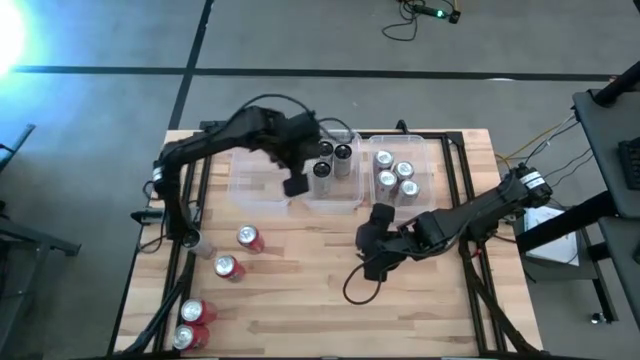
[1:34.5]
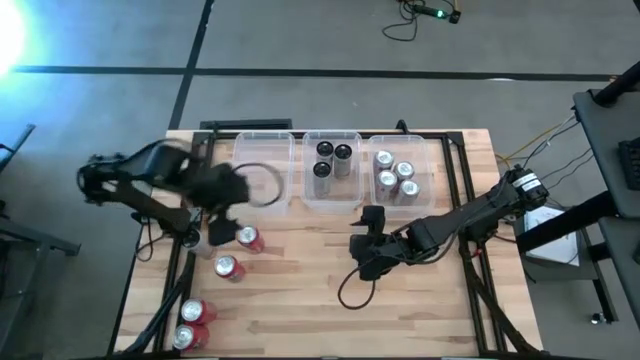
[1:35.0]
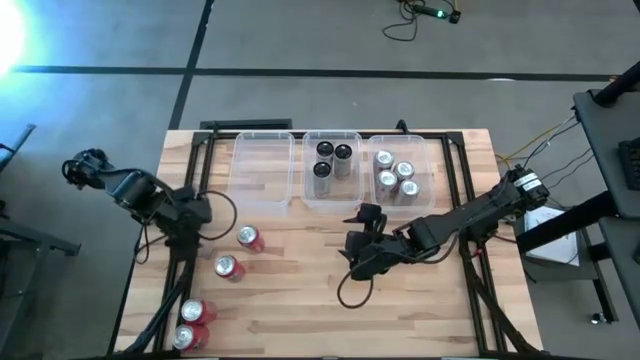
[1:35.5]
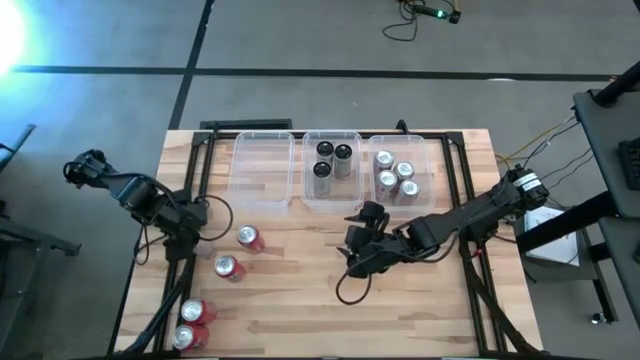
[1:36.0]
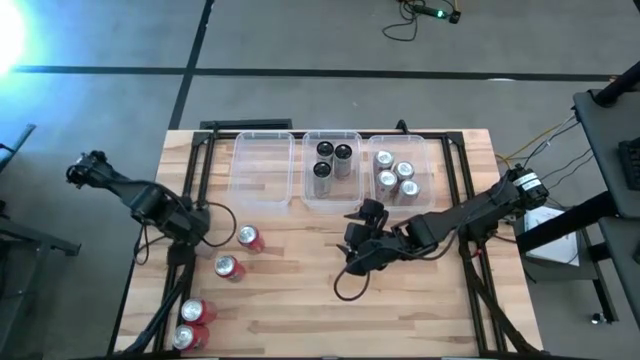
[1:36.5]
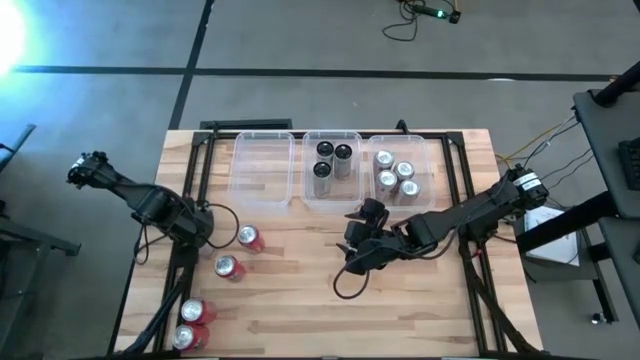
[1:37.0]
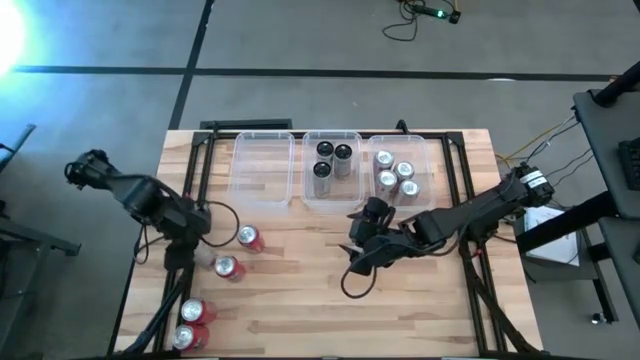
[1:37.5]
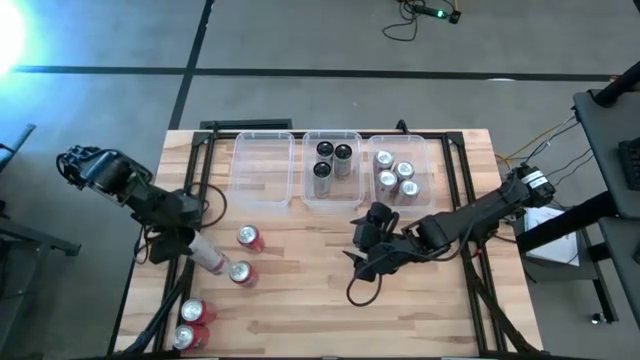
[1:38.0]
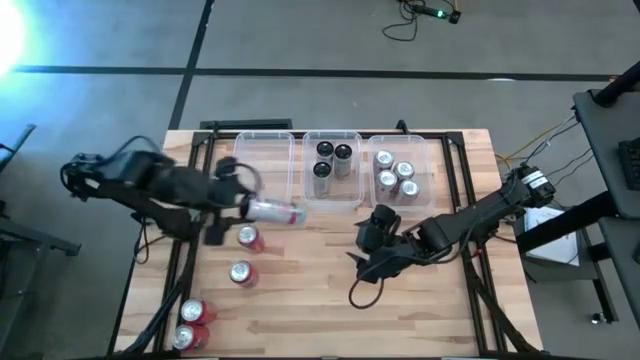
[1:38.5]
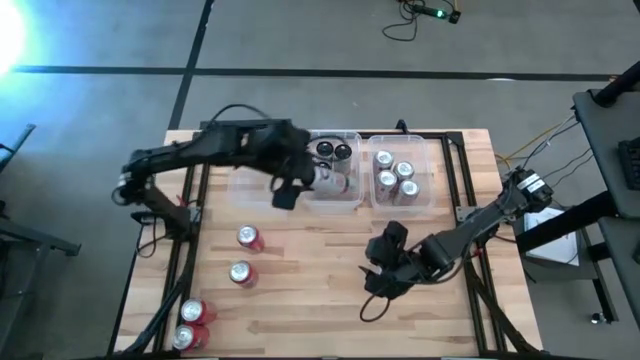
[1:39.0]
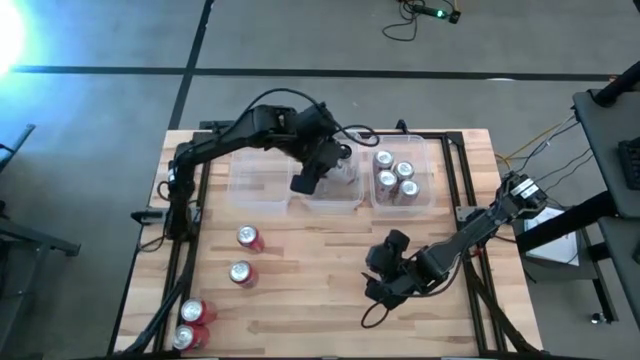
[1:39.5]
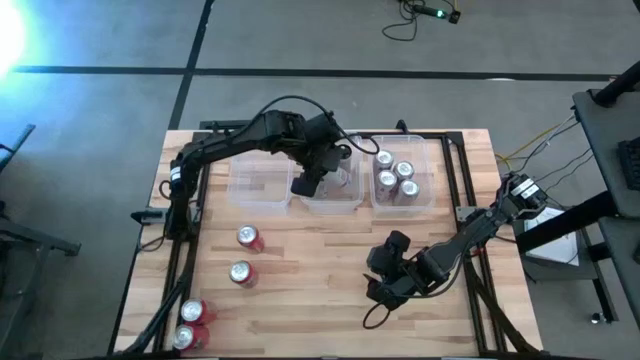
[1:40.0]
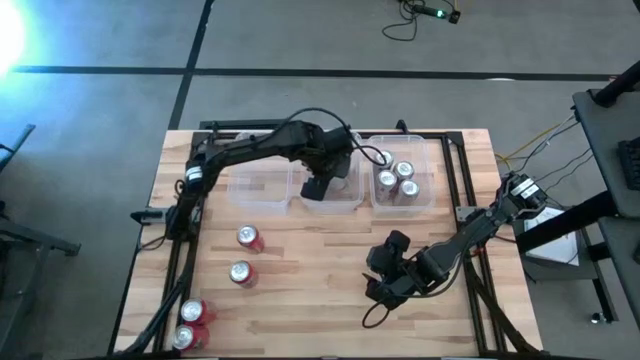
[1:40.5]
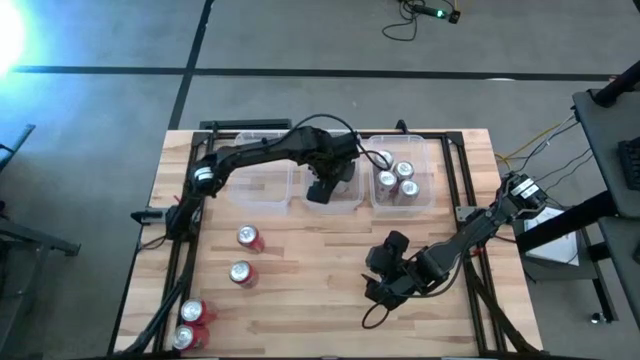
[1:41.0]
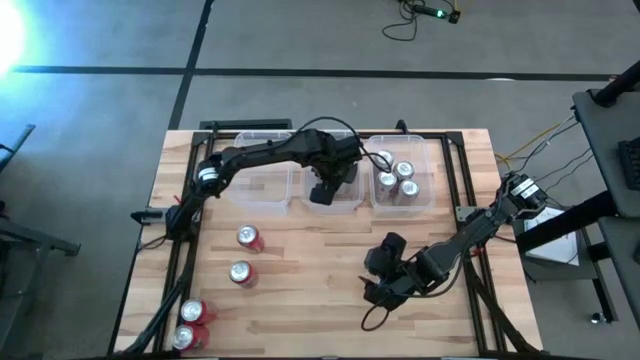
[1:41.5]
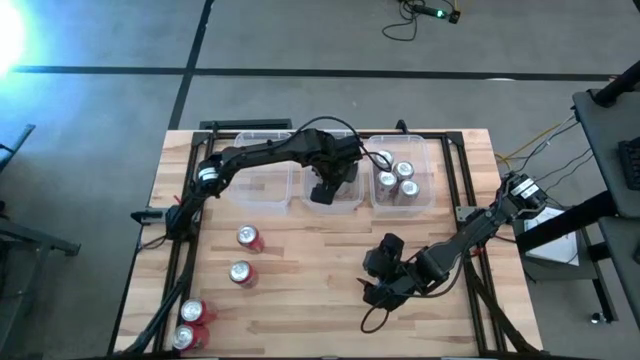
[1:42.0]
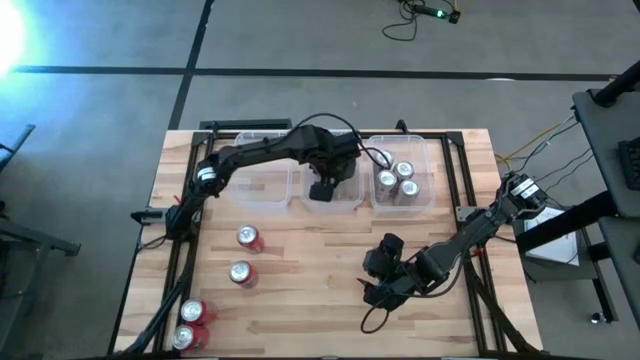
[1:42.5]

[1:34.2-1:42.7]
Task: Sort soda cans
Put the white-pink soda can into the middle transparent bin

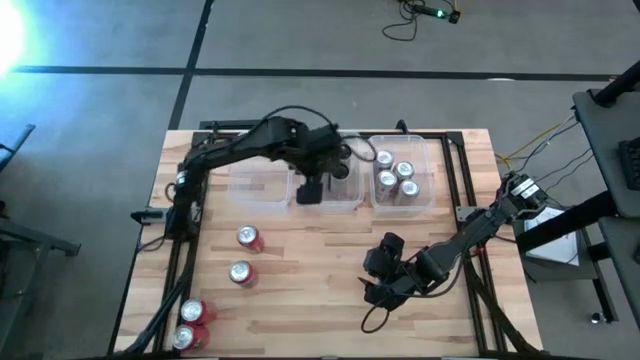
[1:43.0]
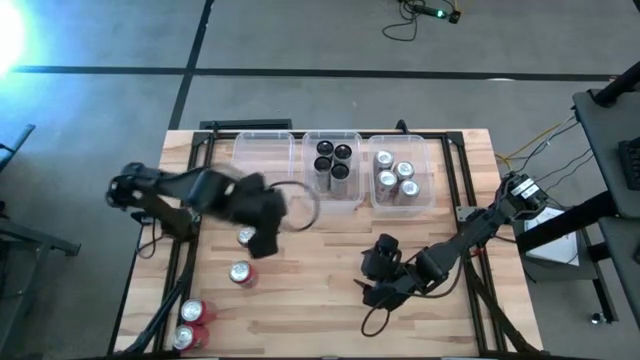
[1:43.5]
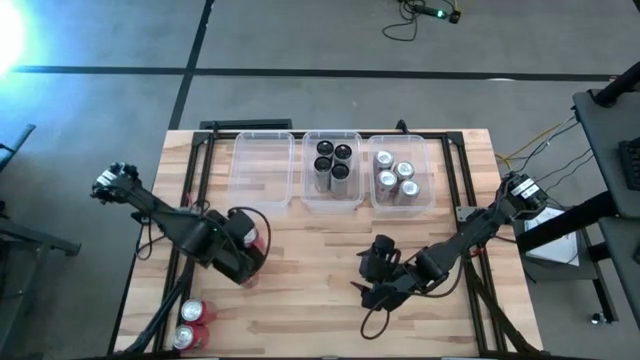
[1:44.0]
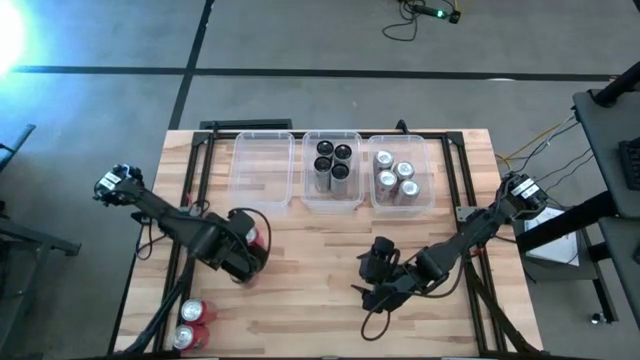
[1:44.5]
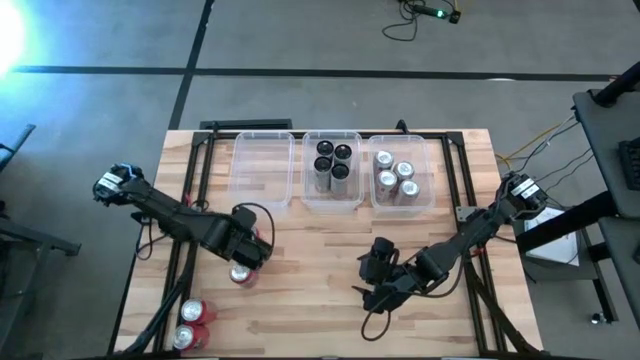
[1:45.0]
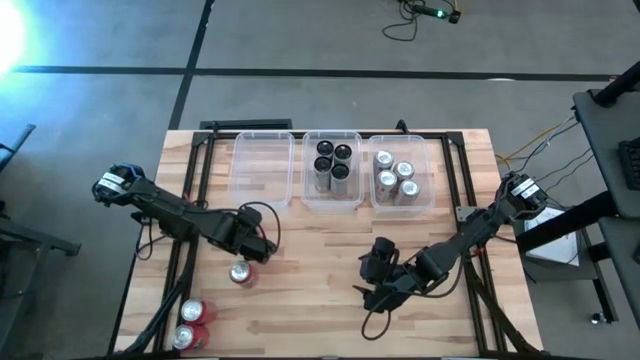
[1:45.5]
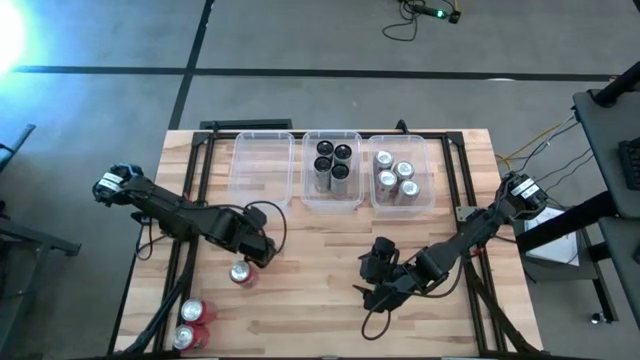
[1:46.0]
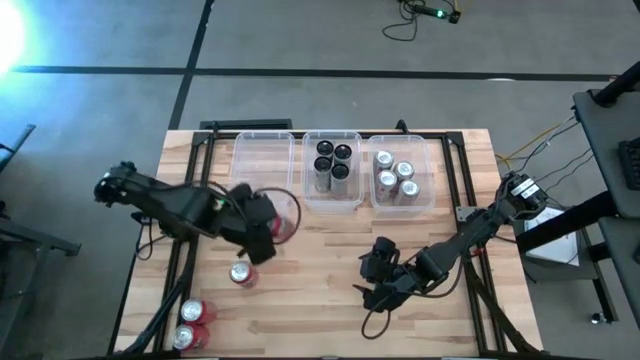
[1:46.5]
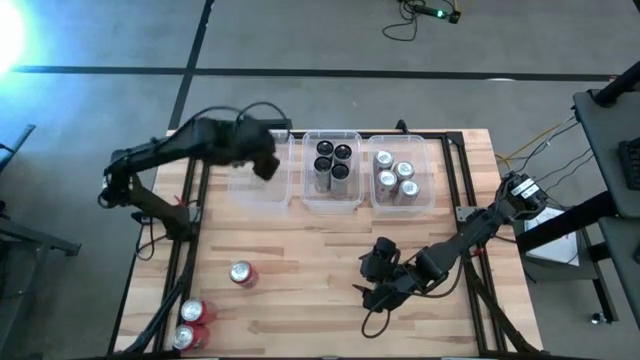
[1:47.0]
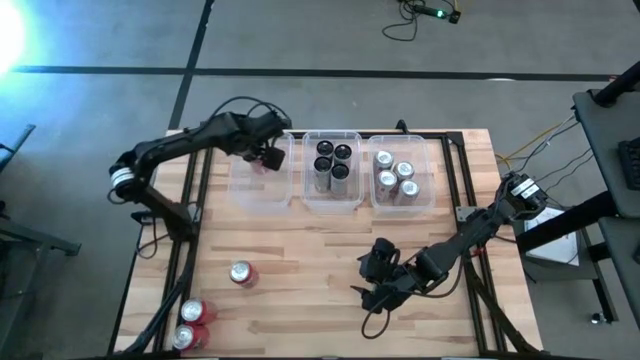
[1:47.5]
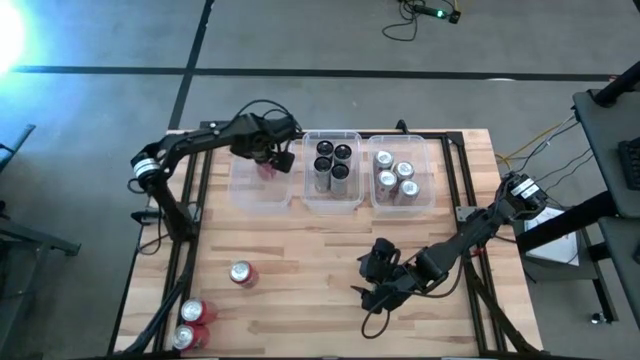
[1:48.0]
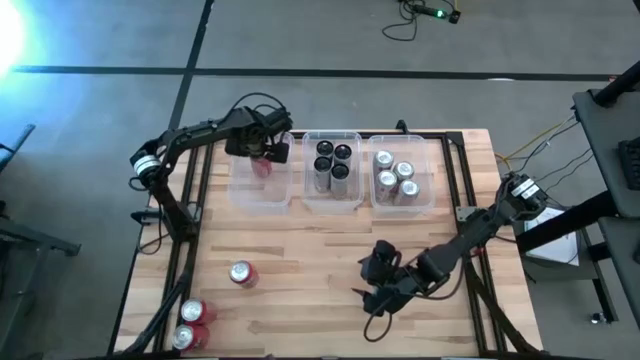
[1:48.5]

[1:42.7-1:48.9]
Put the red soda can into the left transparent bin

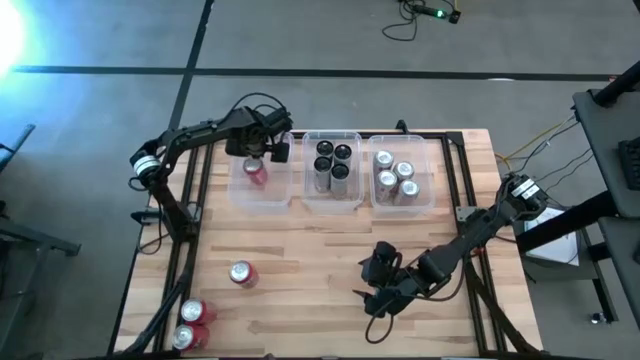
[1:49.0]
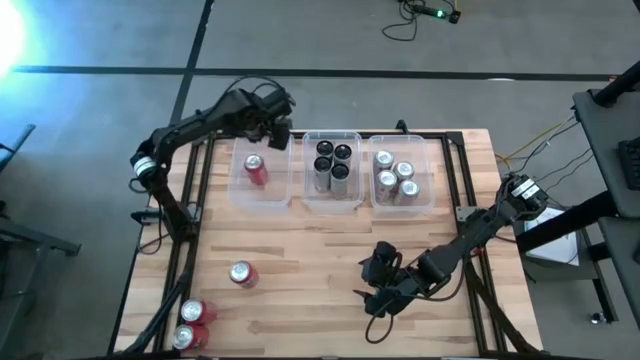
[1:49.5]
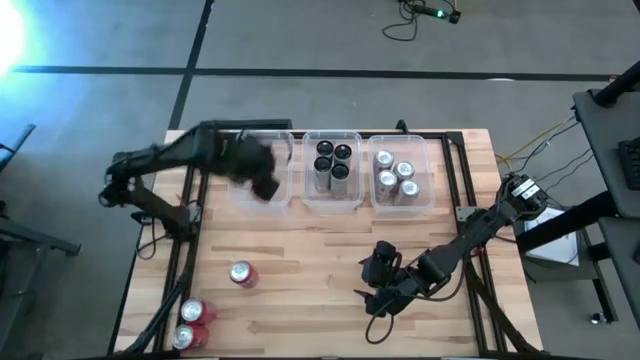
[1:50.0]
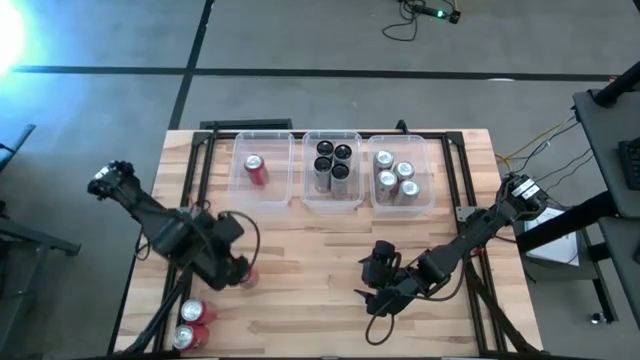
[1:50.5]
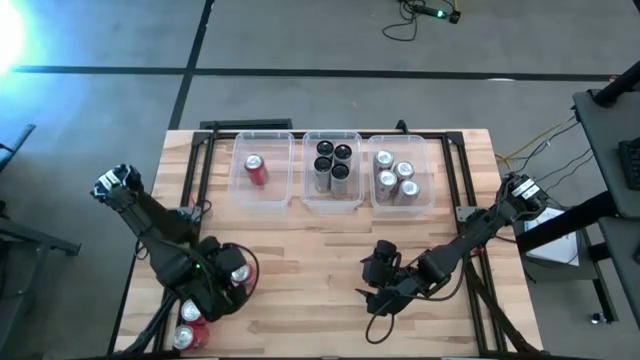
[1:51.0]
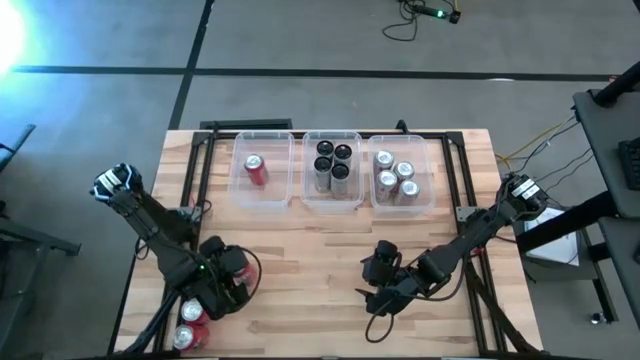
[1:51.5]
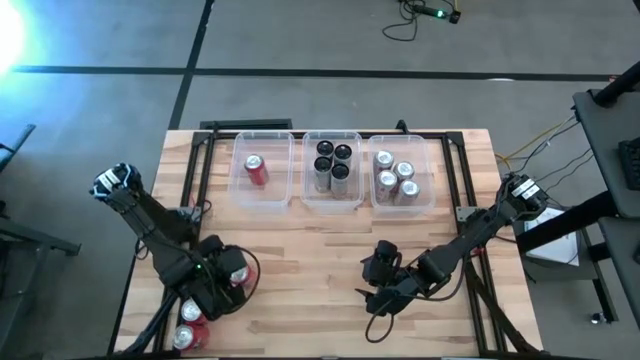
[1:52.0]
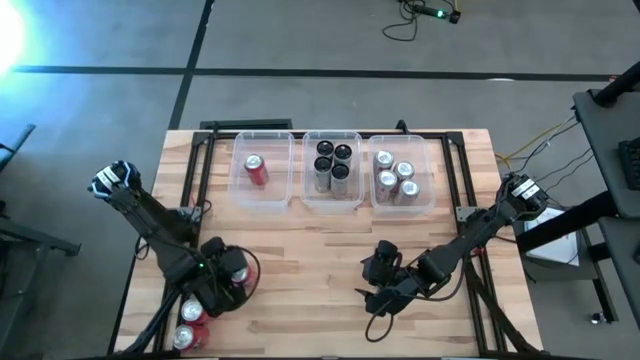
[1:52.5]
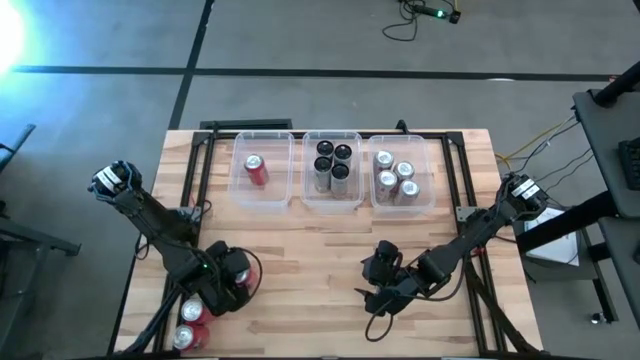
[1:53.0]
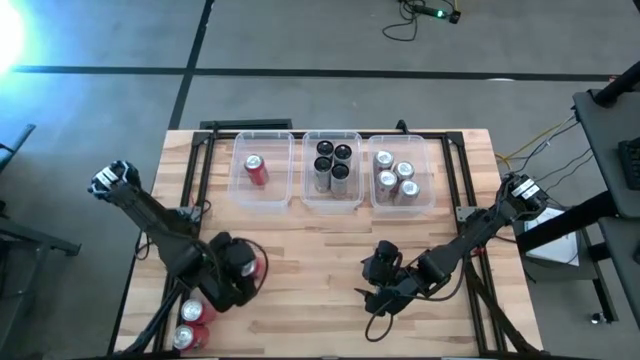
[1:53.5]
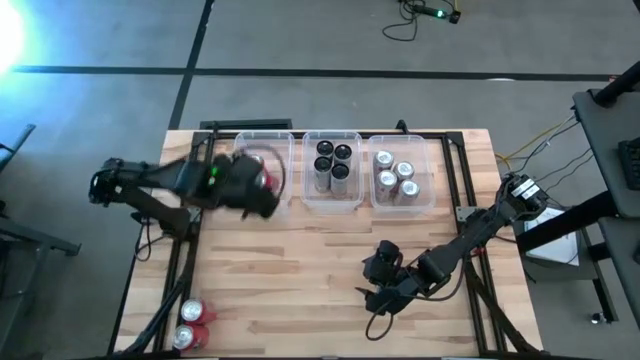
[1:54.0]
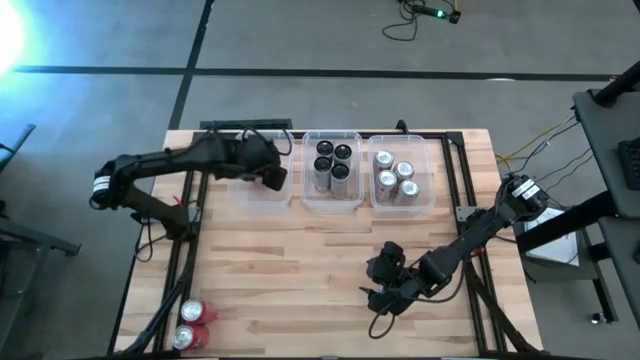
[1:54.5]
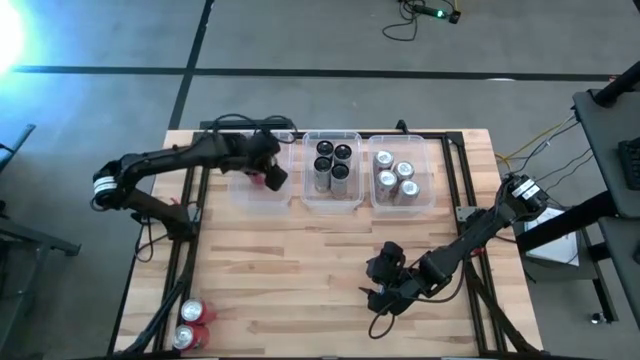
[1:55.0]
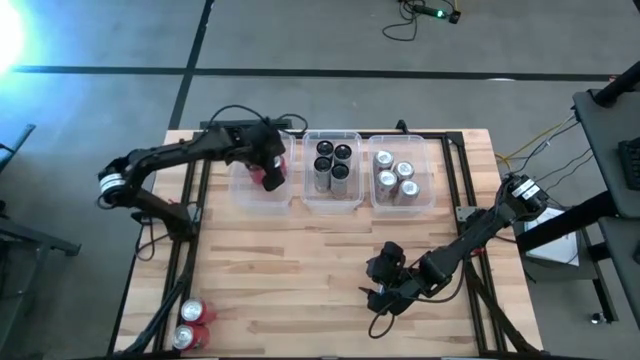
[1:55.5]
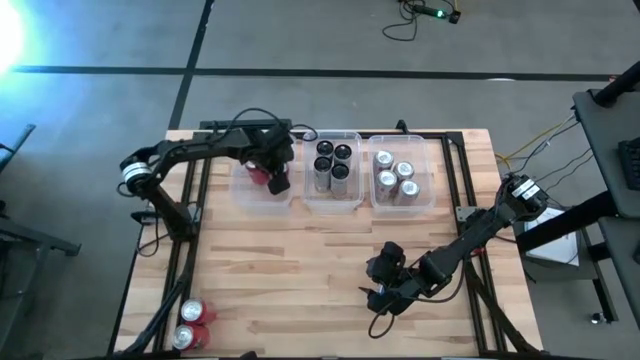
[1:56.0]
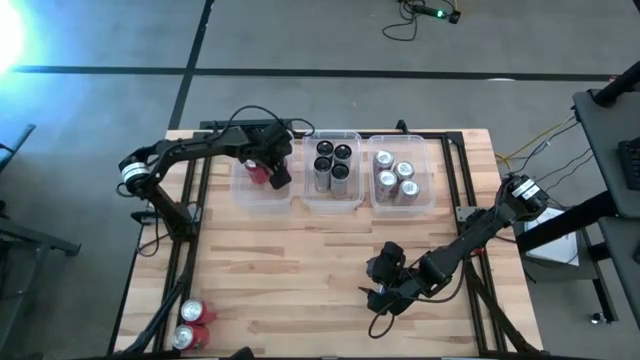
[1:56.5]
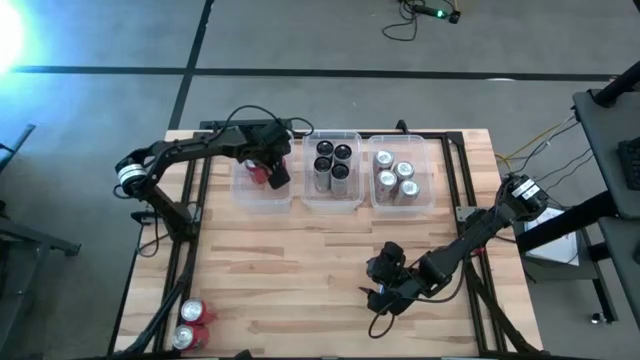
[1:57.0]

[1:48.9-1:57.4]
Put the red soda can into the left transparent bin
